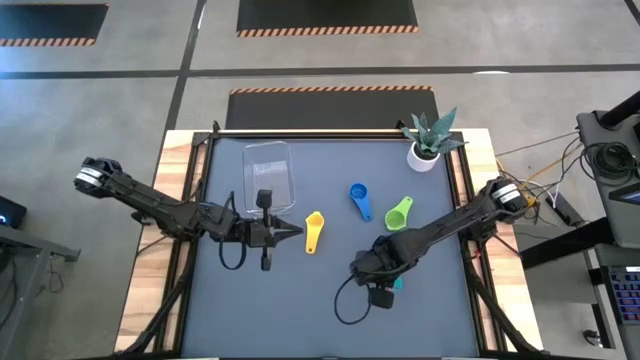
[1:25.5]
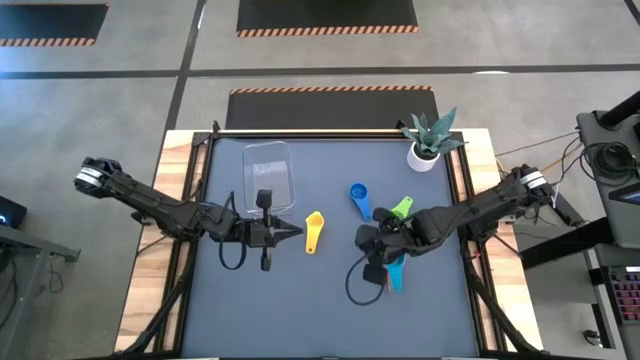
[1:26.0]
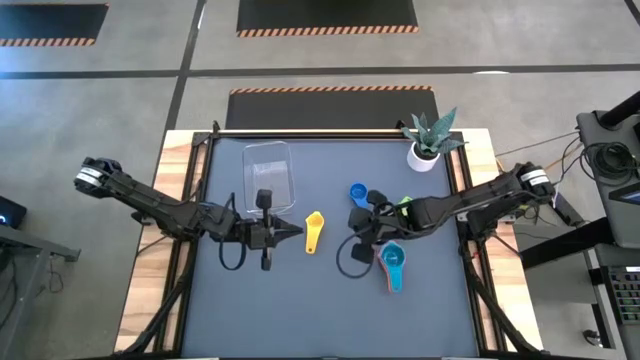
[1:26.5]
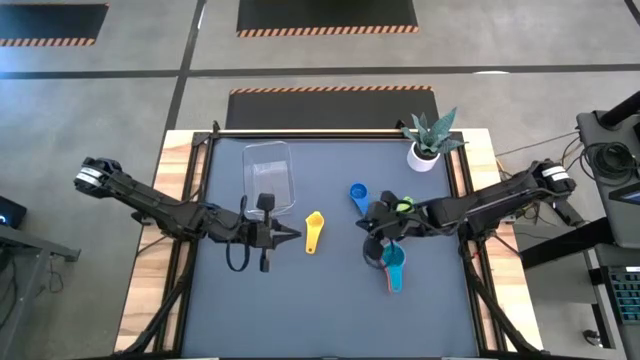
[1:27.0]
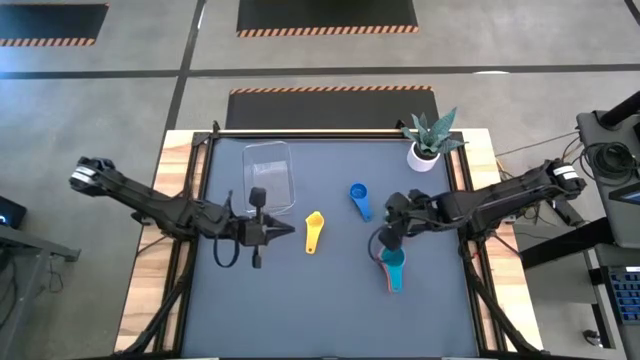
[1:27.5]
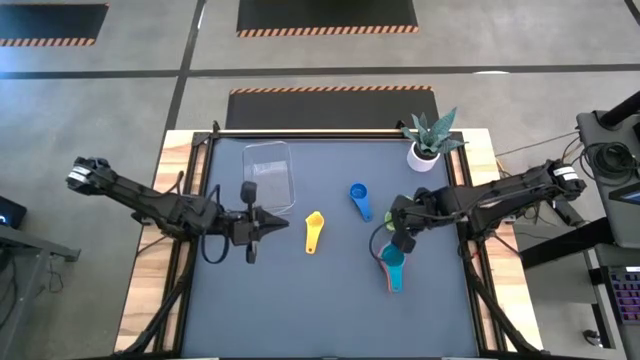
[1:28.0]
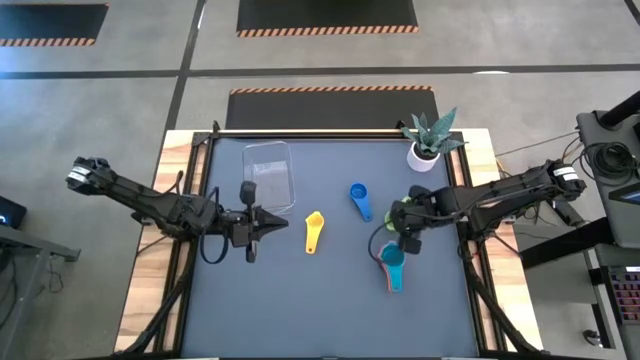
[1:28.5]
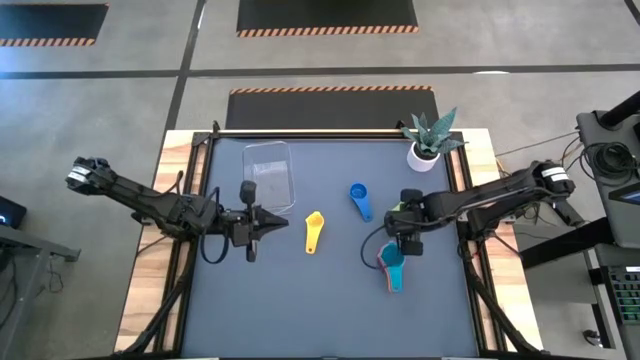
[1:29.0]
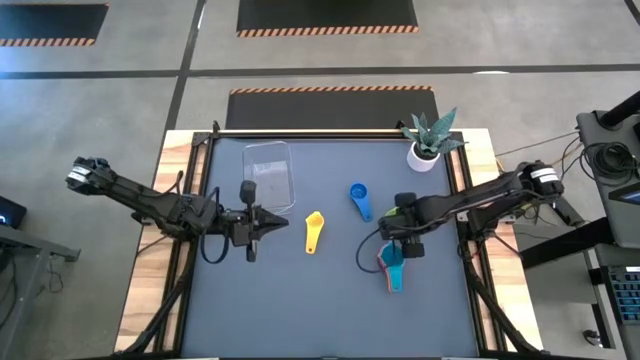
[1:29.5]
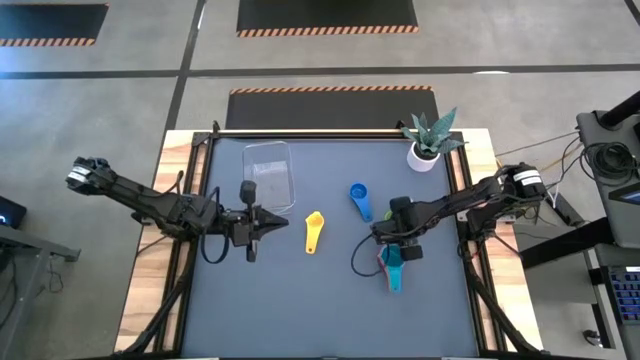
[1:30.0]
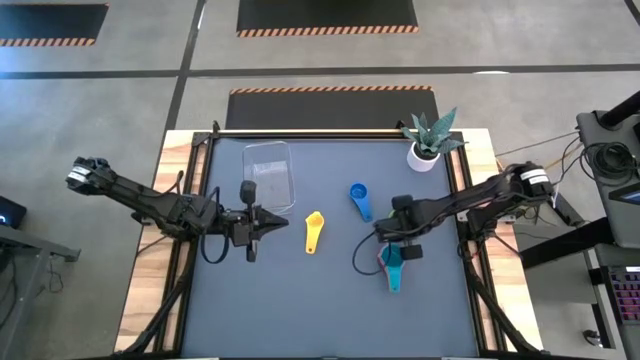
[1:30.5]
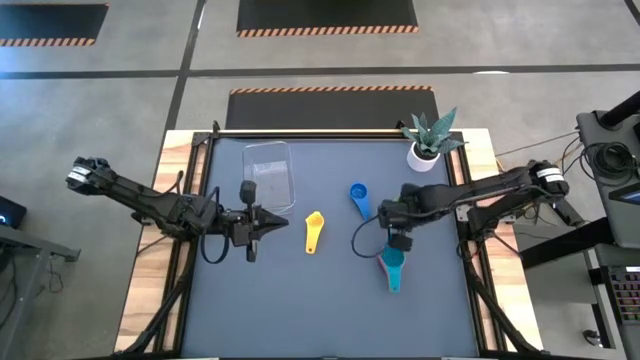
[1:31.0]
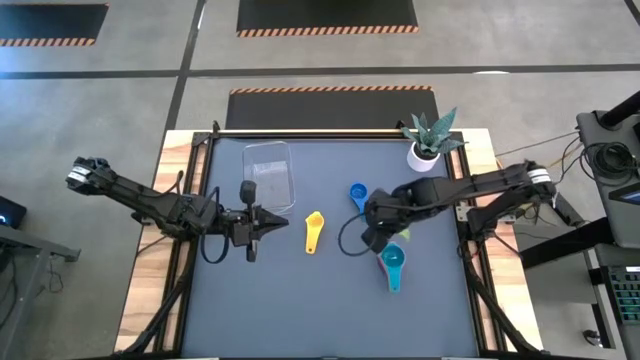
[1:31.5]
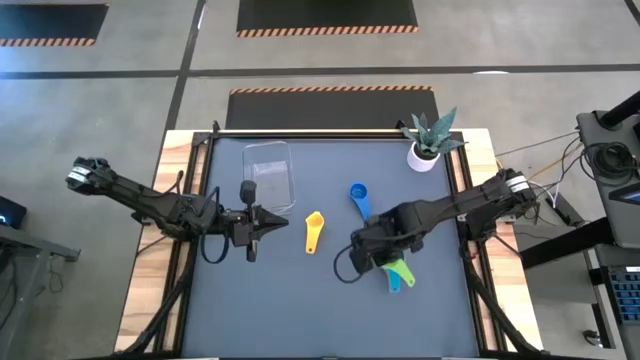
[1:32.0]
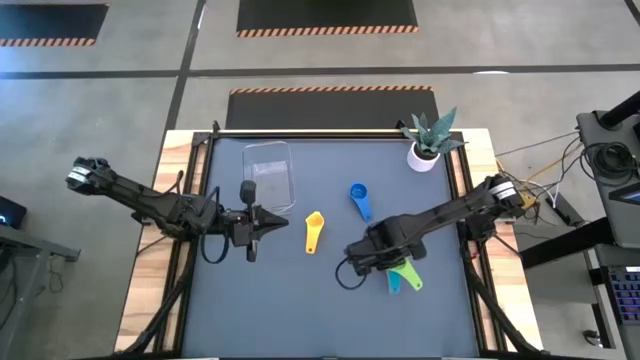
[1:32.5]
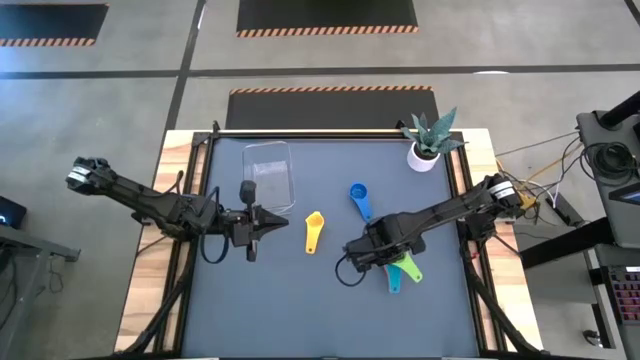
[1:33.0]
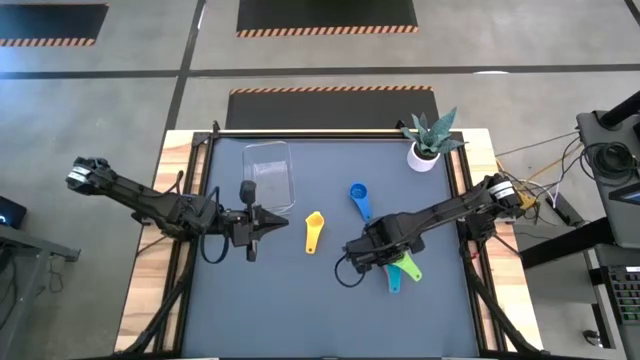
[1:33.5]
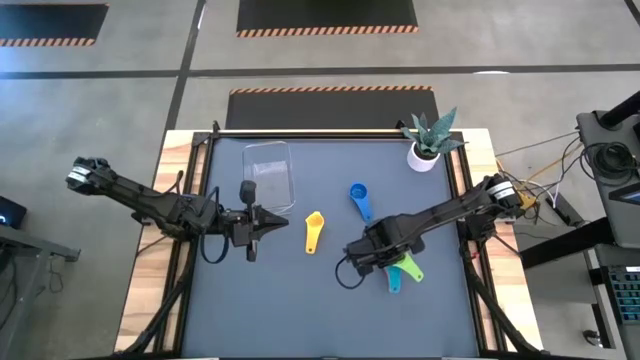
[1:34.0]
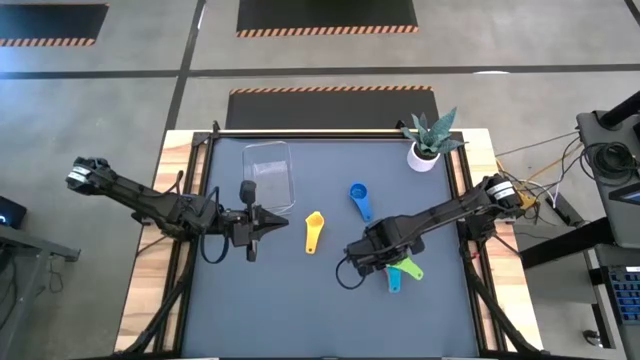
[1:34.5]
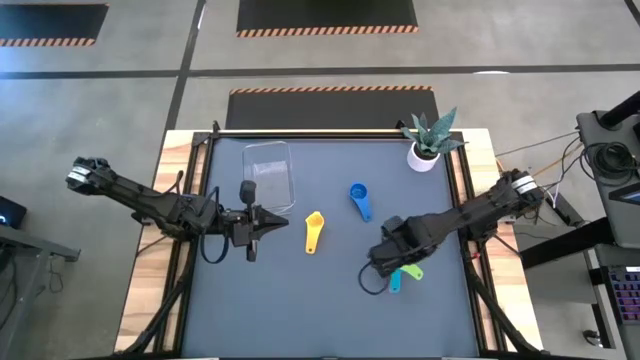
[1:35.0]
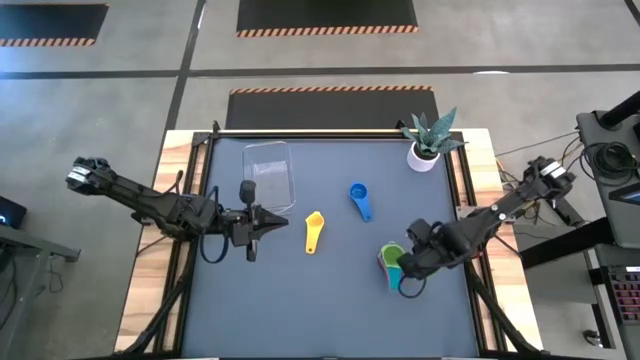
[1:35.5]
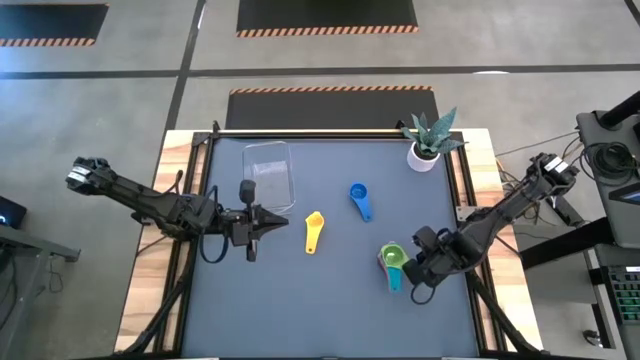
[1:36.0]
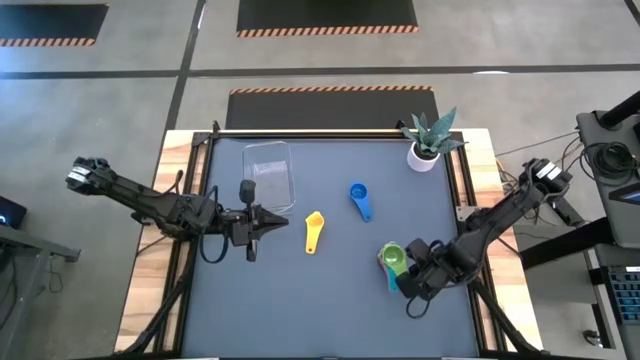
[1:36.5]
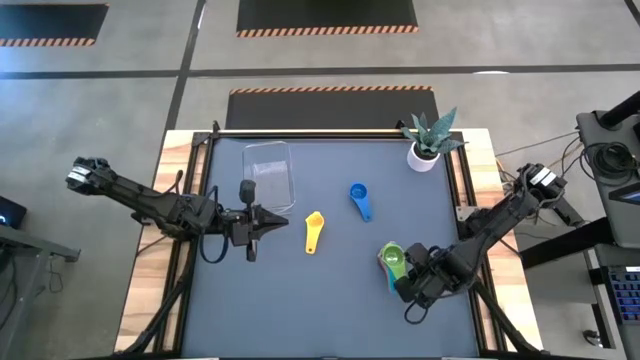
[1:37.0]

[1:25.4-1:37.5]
Task: Nest measuring cups in basket
Stack the green measuring cup on top of the light blue measuring cup

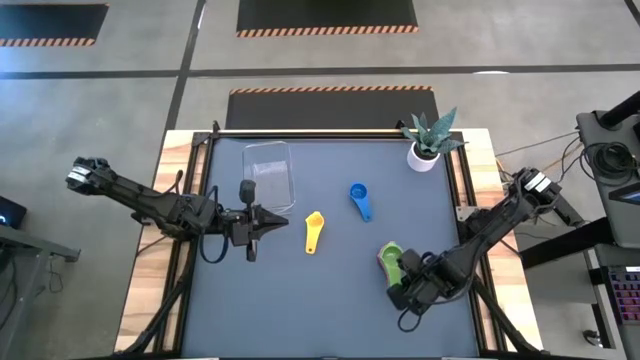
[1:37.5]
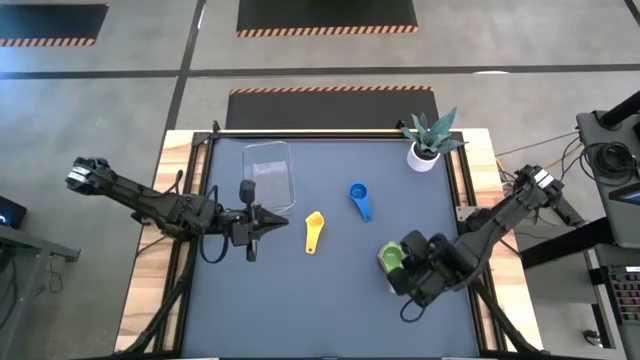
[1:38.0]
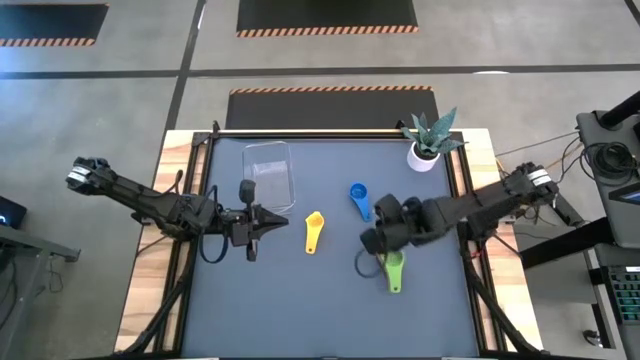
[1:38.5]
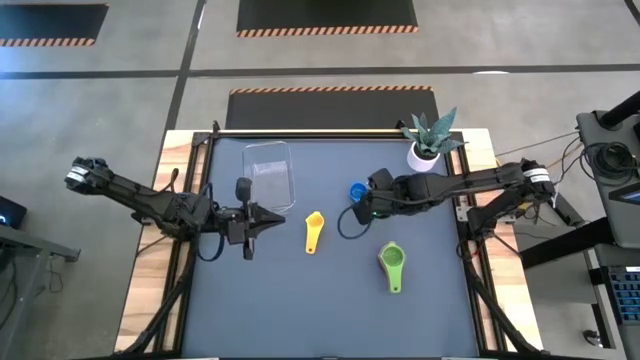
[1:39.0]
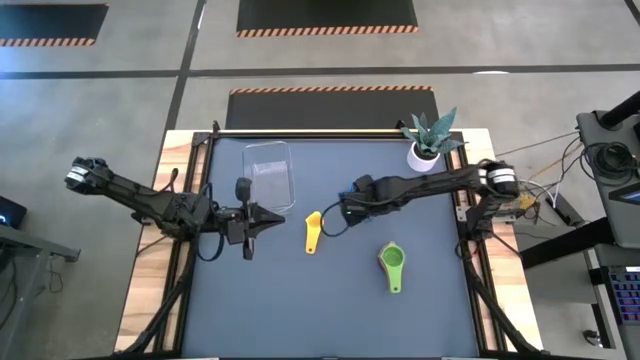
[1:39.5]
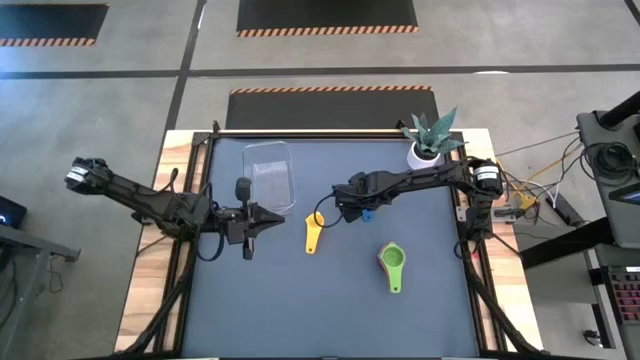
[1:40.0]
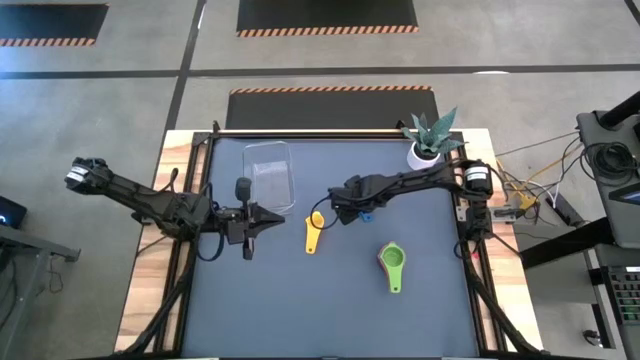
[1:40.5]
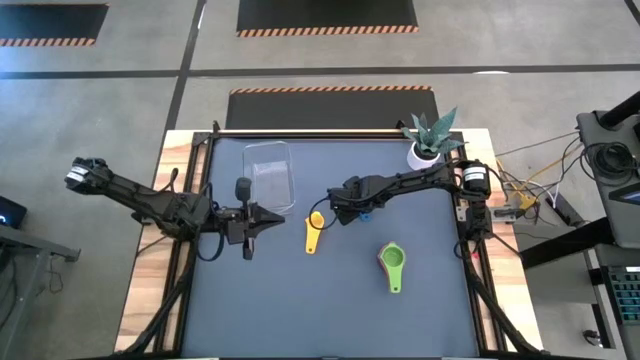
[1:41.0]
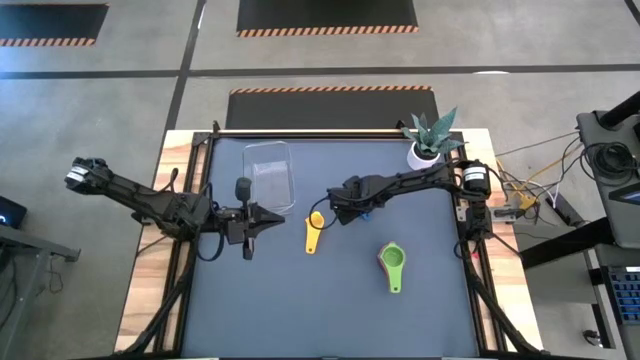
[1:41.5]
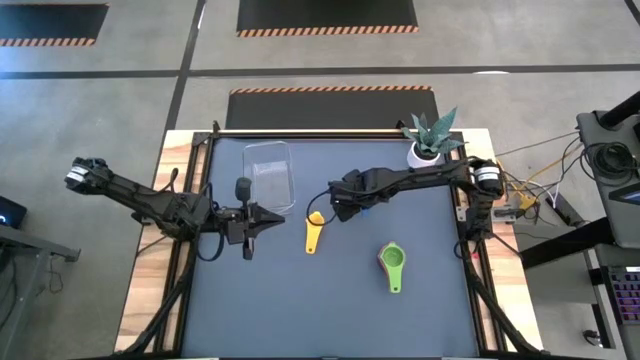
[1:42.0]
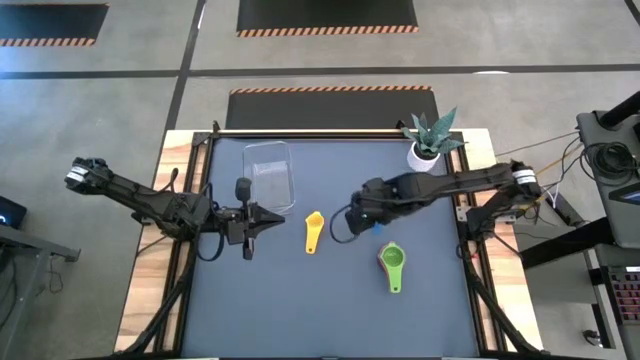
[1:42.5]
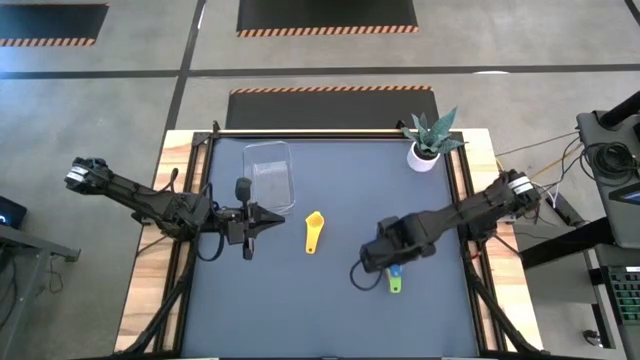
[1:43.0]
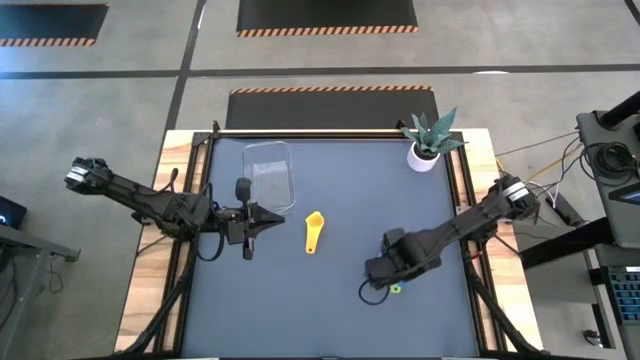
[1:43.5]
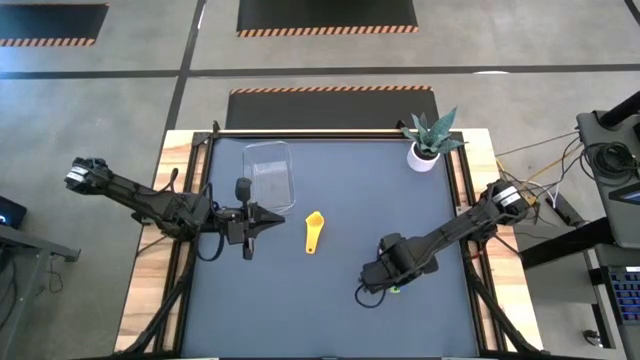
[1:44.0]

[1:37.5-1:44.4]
Stack the blue measuring cup on top of the green measuring cup

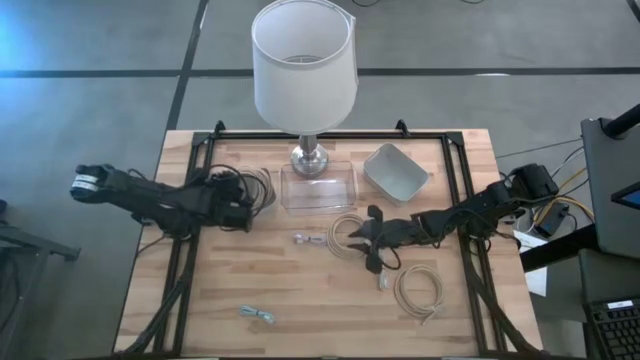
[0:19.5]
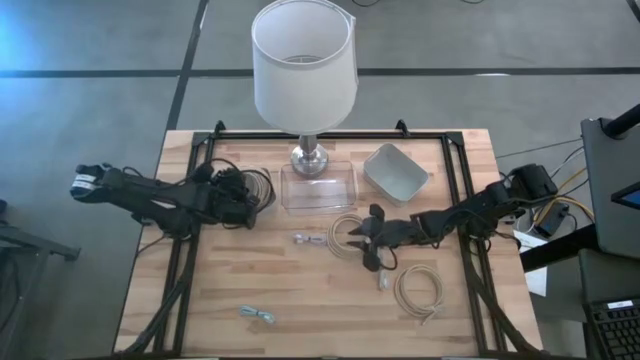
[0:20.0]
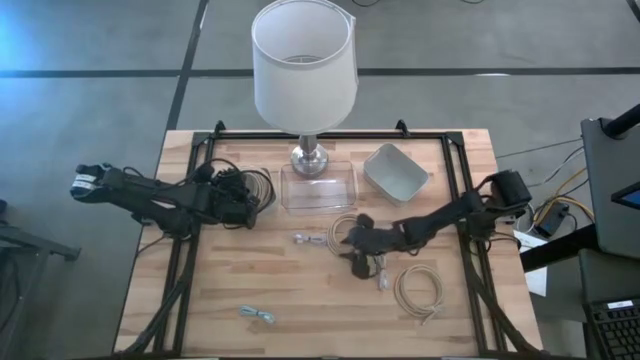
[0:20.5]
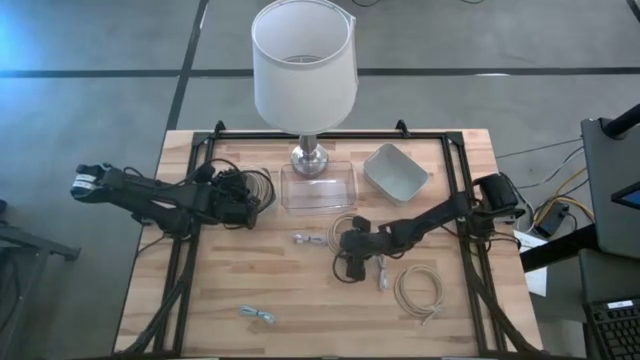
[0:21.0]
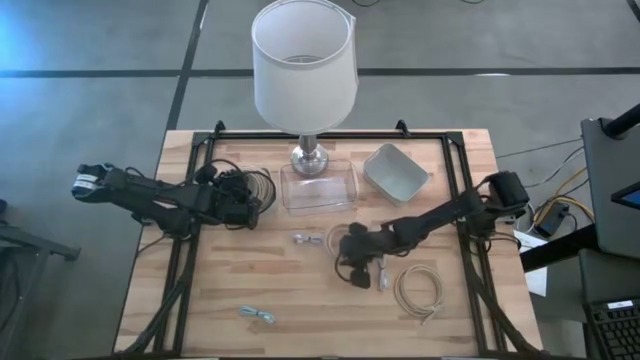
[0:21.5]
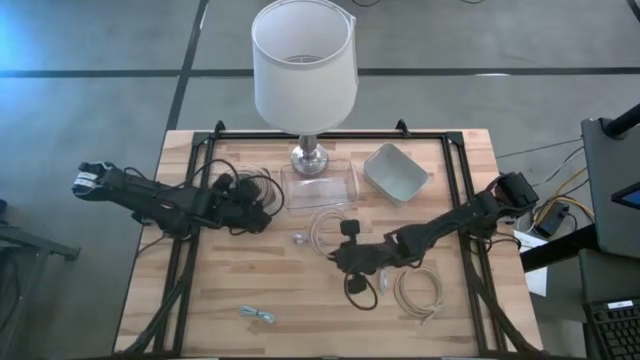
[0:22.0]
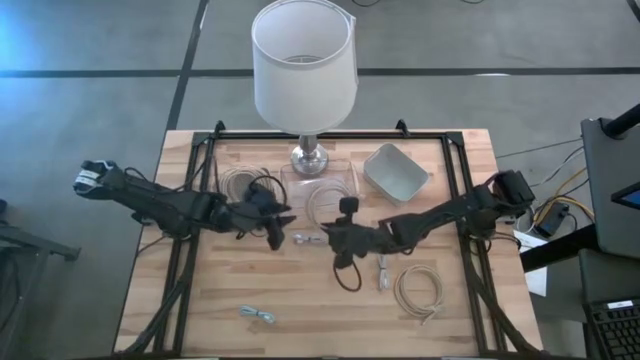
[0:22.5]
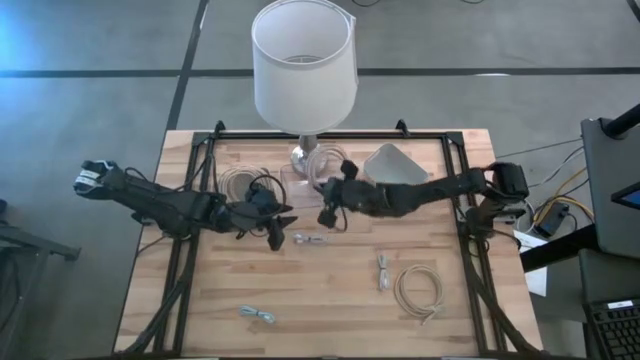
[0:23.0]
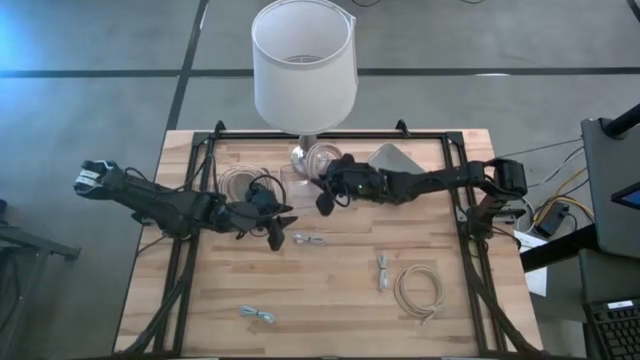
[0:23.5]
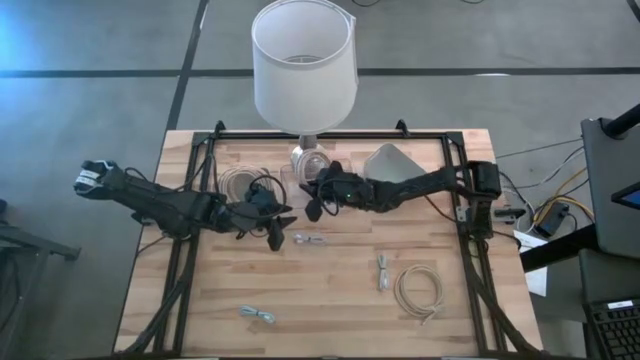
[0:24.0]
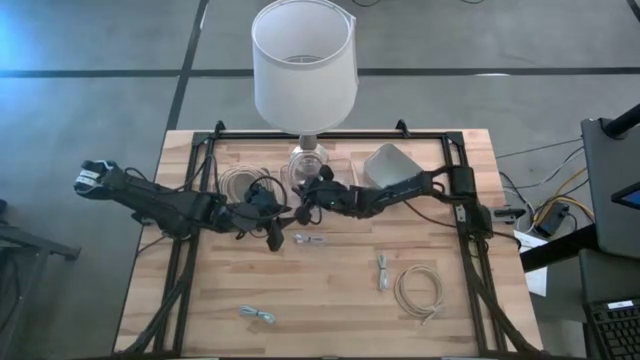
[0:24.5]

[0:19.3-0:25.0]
Task: Pick & Place USB Port
Put the light brown hdmi cable into the transparent bin
